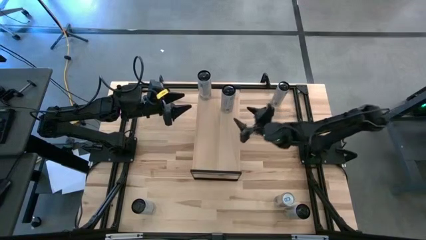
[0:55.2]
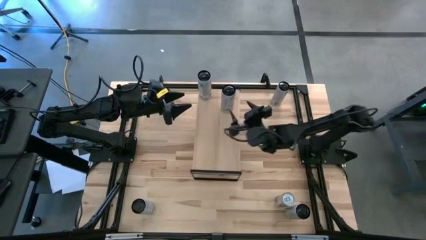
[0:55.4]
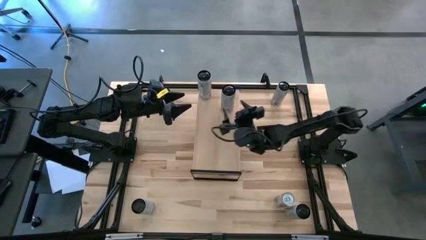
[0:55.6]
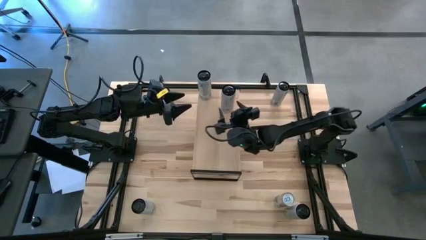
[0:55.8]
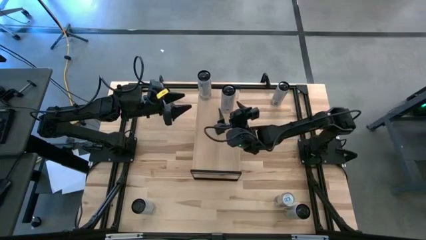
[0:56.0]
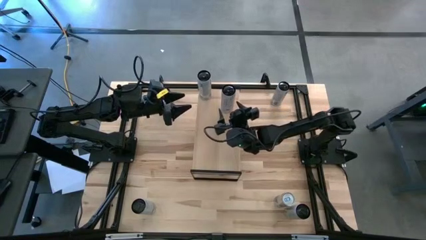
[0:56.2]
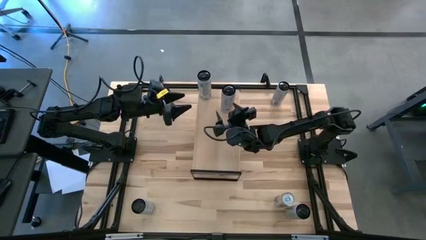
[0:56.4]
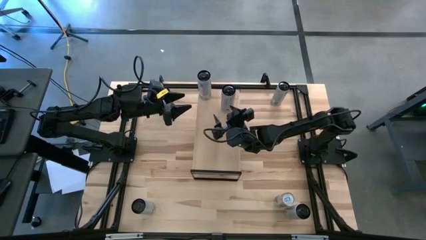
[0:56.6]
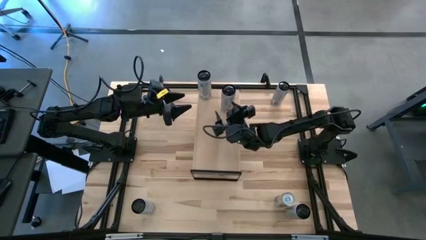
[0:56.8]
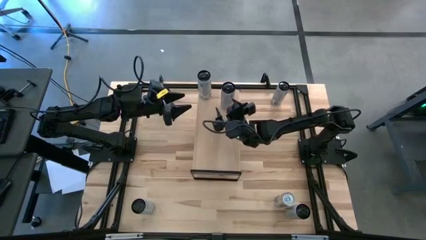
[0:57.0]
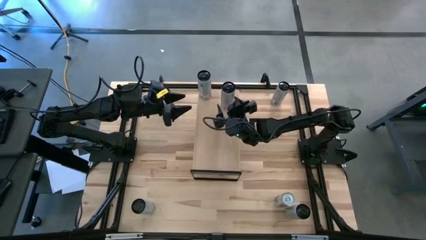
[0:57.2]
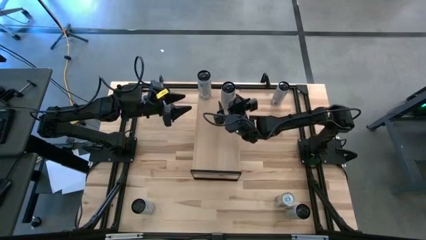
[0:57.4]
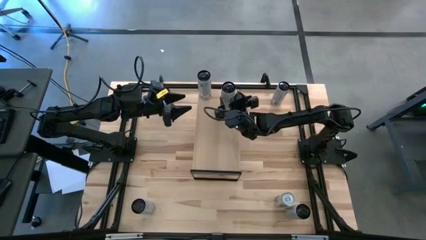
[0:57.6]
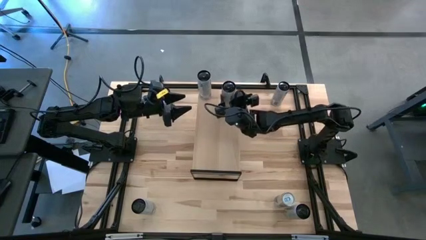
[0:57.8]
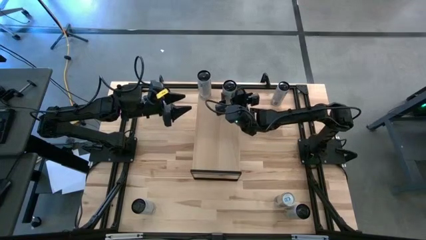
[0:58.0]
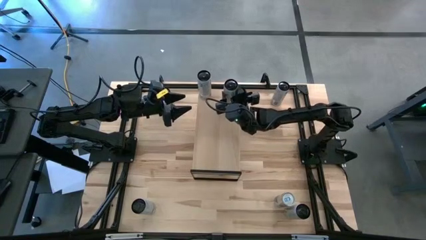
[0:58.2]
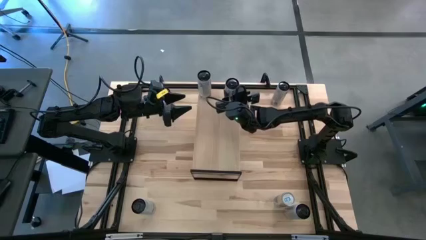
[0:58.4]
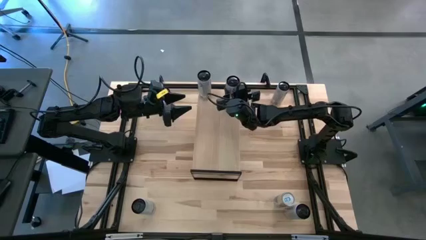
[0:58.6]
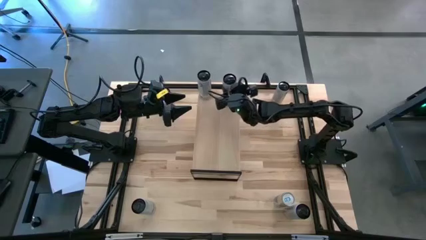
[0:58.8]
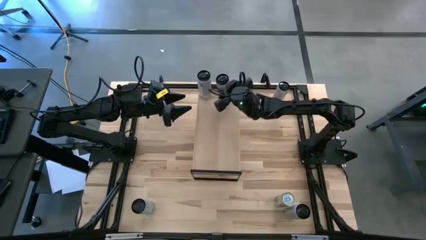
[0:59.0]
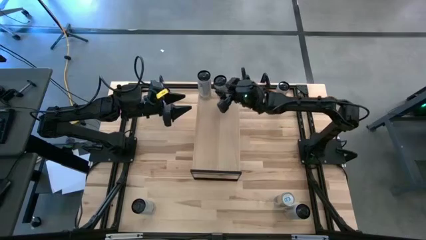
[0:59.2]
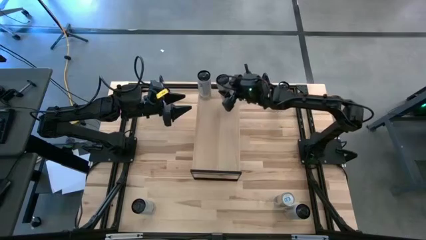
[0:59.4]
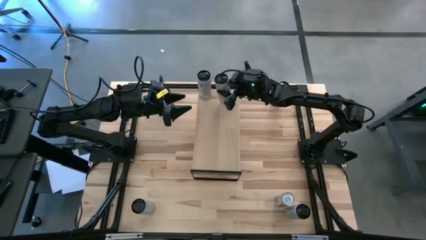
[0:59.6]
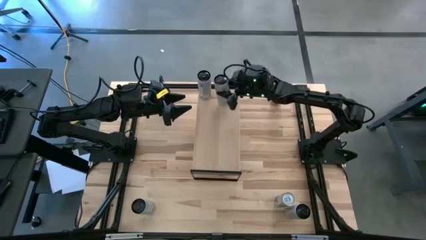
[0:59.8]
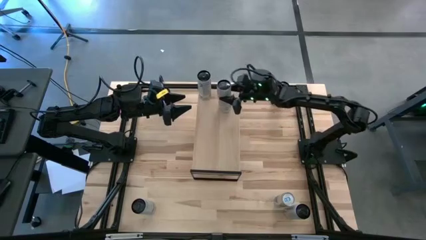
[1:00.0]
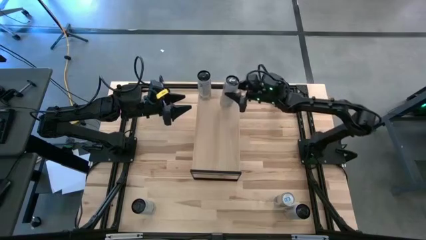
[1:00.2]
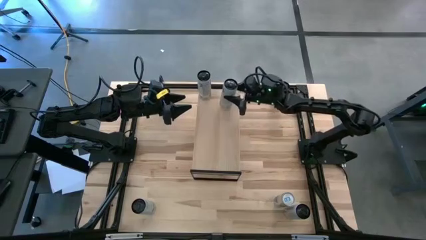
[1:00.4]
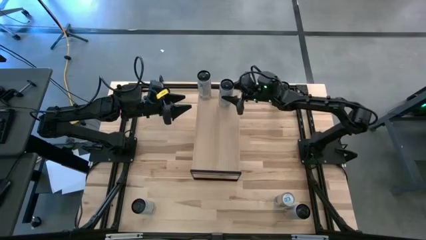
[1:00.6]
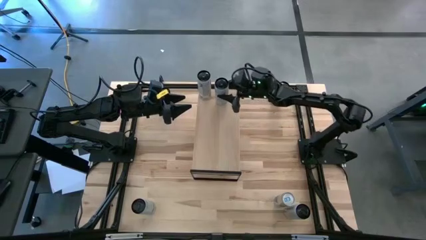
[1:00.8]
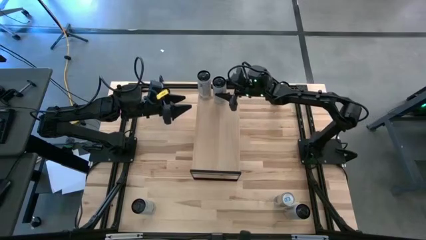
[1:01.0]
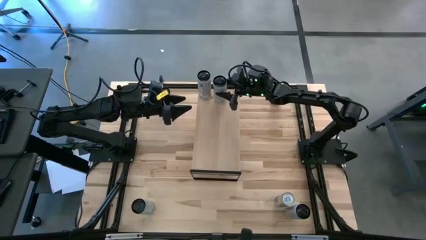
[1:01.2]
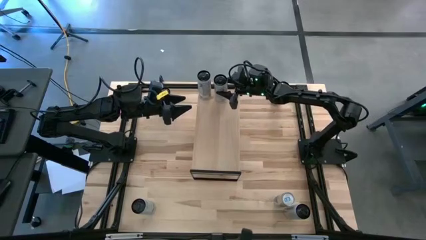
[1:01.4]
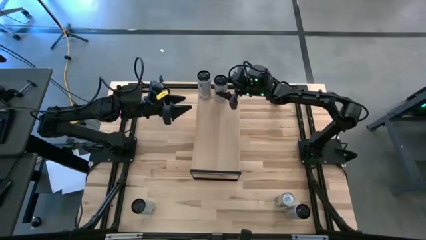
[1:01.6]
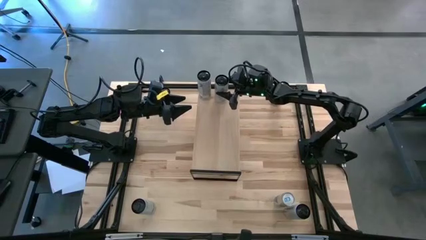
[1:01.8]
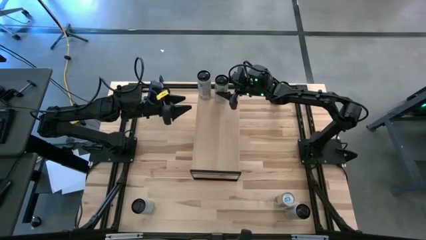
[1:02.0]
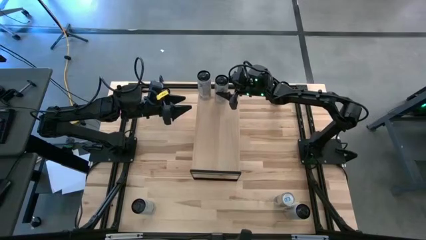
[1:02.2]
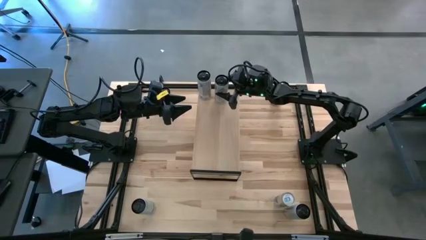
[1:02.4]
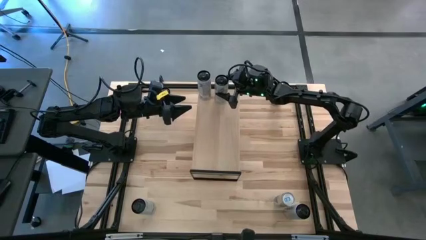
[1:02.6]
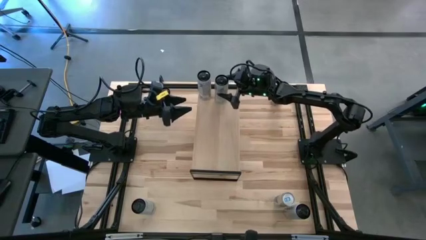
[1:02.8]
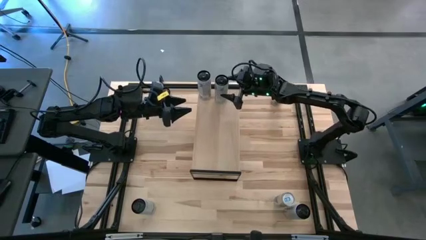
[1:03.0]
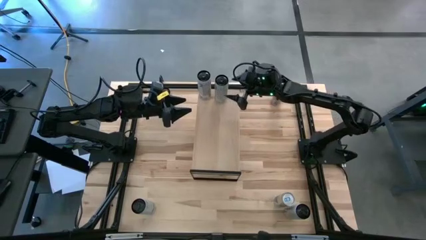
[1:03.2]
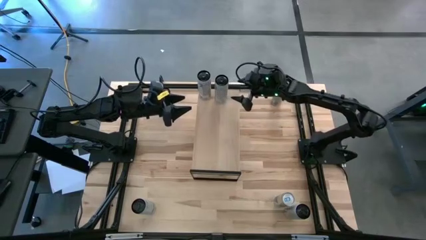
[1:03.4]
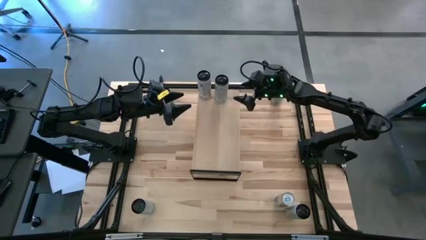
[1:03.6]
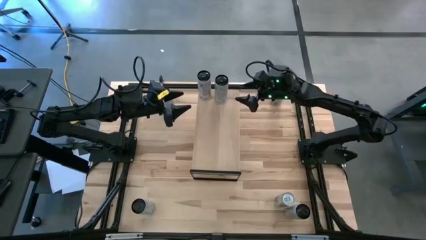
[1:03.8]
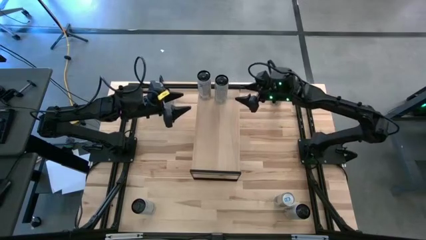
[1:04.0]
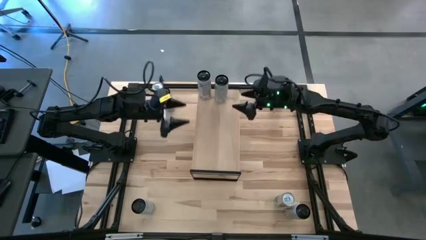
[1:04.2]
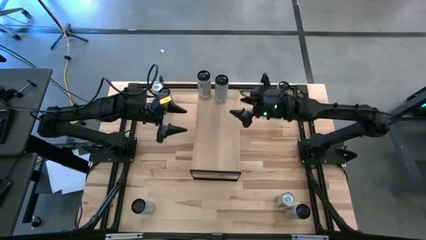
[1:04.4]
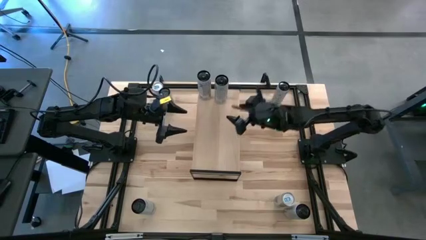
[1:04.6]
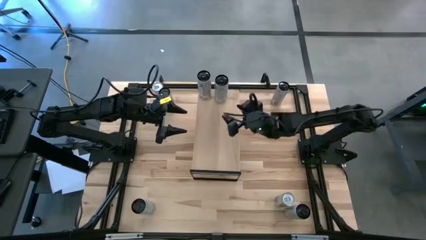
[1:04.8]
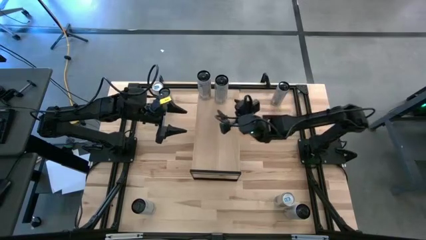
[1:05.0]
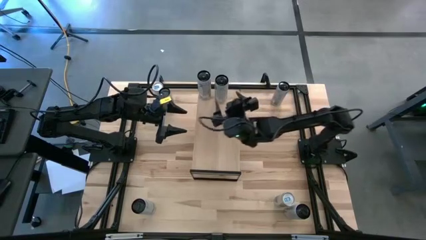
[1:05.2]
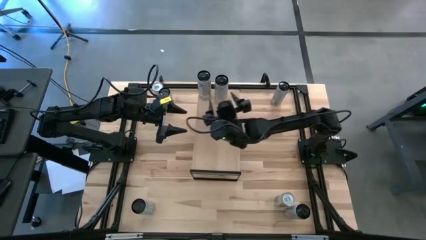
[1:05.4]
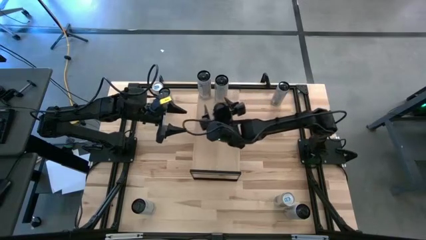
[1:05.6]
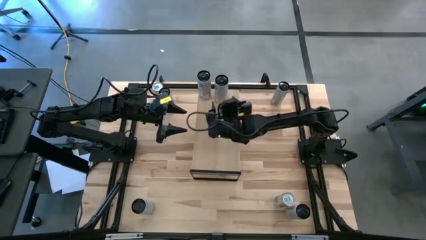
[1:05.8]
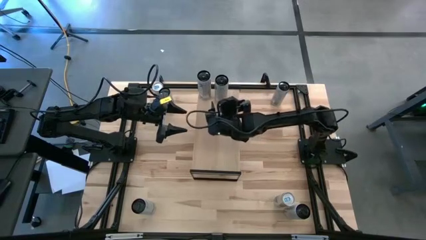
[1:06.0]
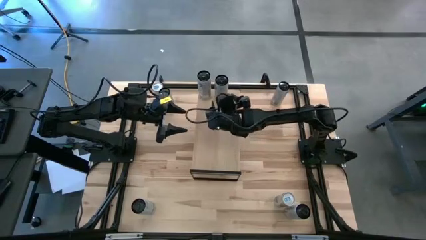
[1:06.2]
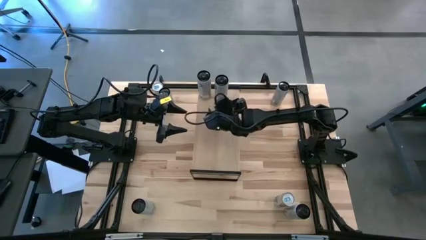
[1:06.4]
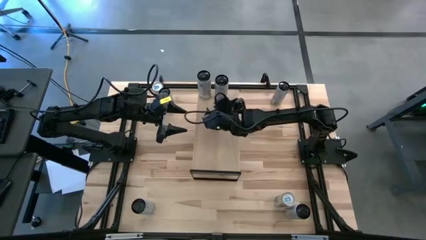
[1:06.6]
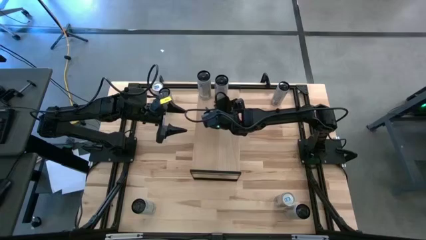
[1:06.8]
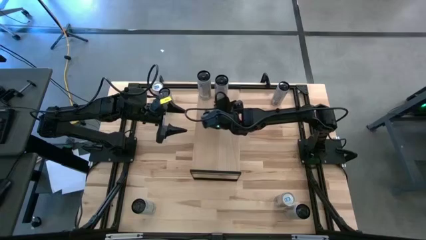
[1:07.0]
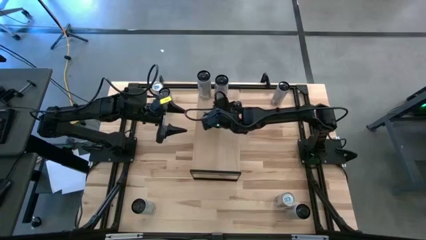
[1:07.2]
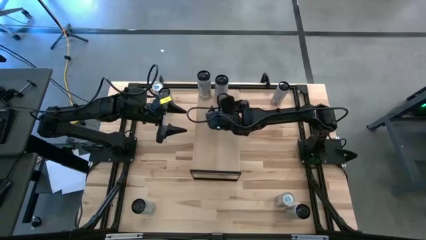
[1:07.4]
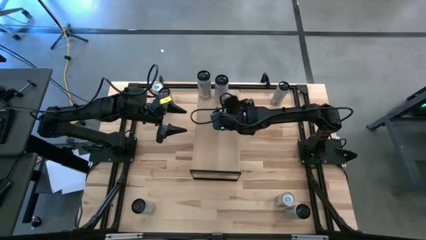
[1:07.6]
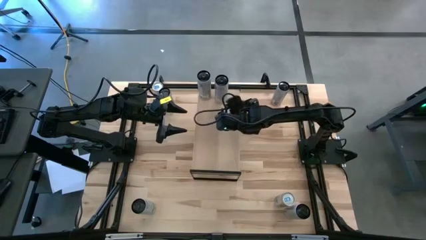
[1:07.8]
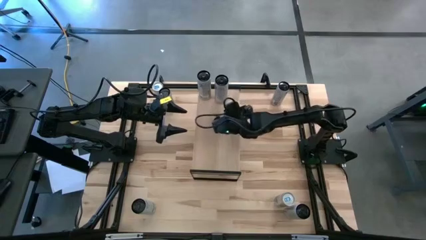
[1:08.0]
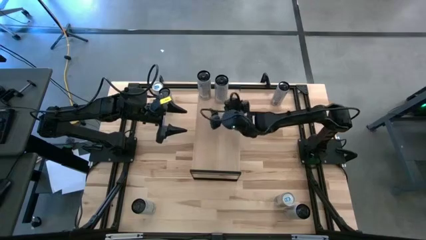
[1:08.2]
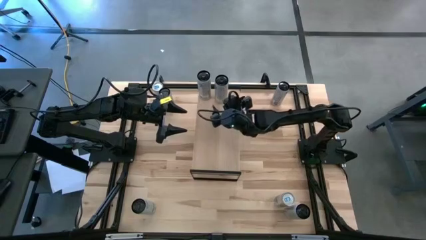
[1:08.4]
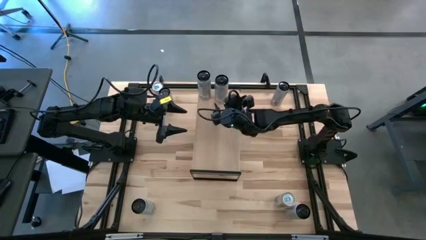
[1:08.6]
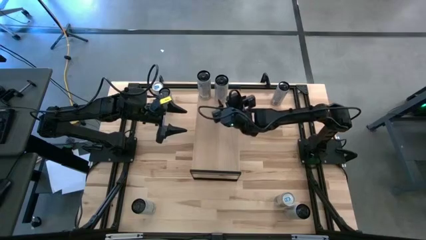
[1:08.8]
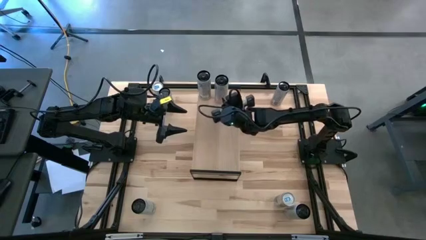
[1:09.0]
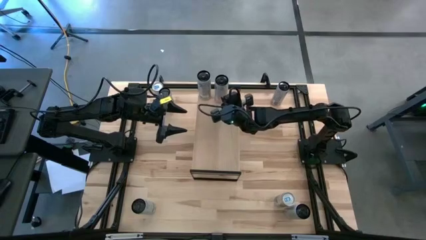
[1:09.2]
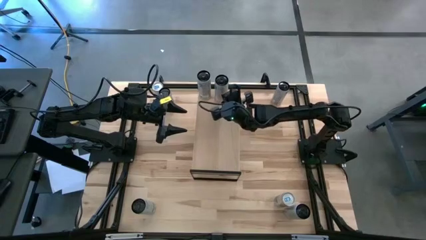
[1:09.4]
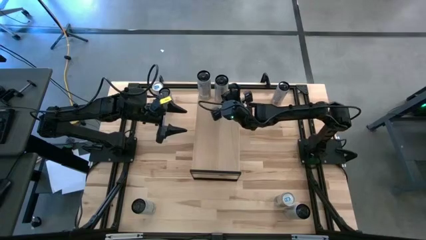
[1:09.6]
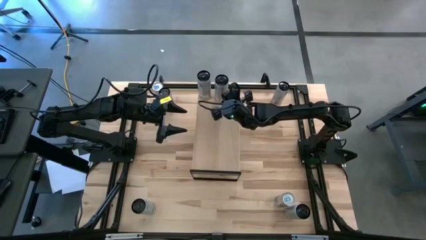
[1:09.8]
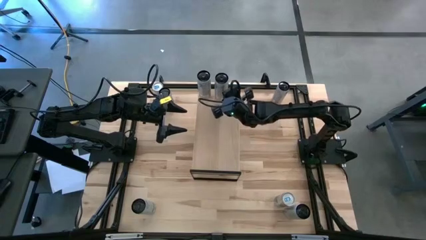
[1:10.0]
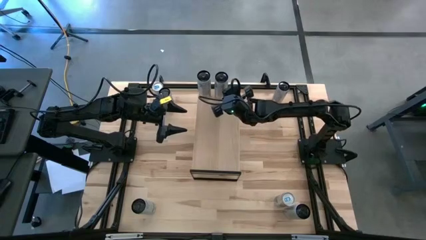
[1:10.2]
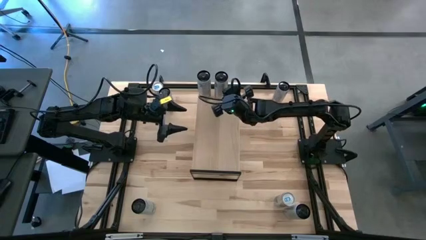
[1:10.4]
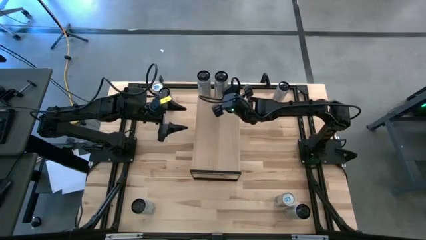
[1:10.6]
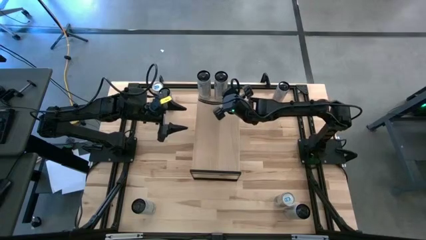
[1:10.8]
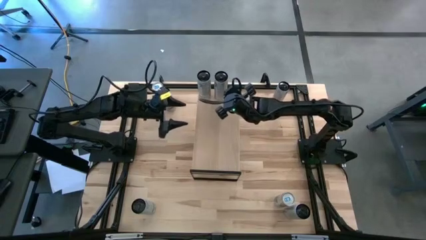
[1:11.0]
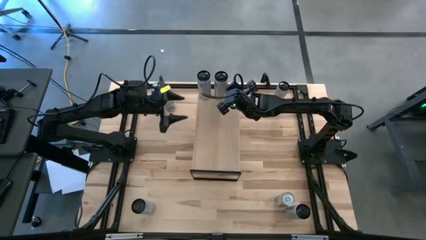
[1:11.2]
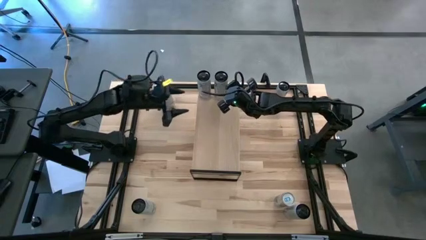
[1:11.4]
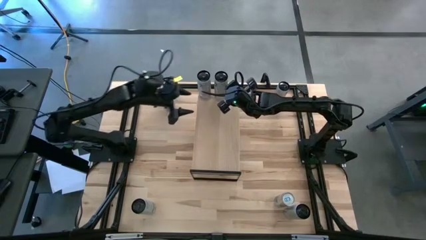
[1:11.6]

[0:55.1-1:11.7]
Task: Place canned beverage on shelf
Put the white pink soda can on the shelf aligned with the white pink soda can
